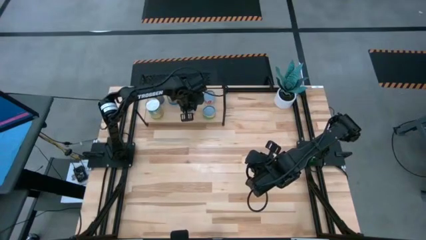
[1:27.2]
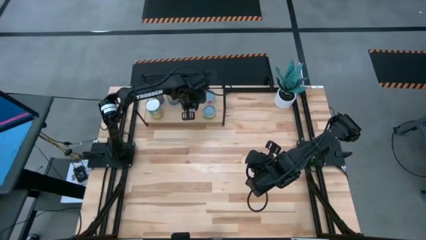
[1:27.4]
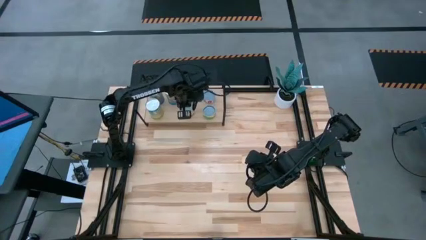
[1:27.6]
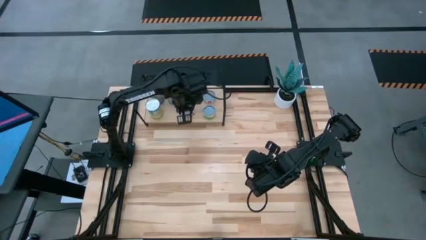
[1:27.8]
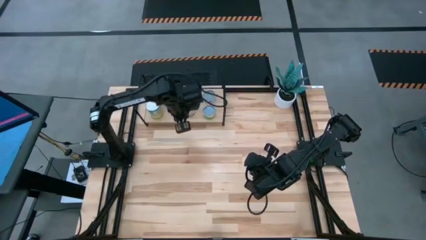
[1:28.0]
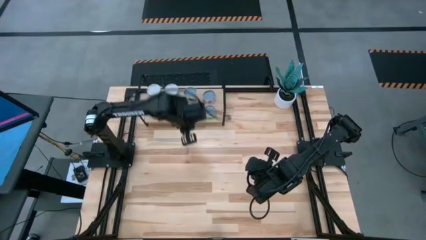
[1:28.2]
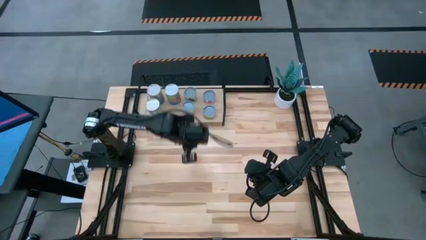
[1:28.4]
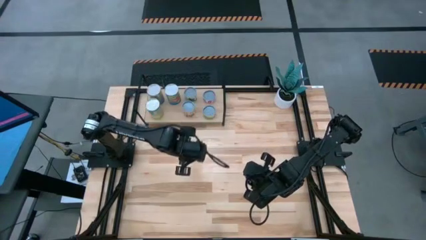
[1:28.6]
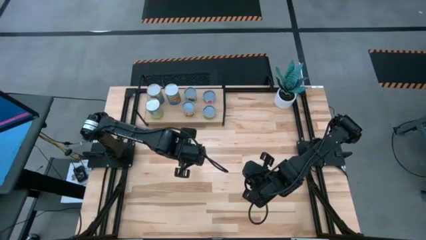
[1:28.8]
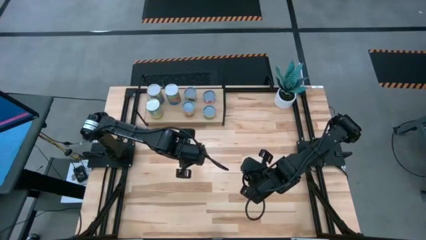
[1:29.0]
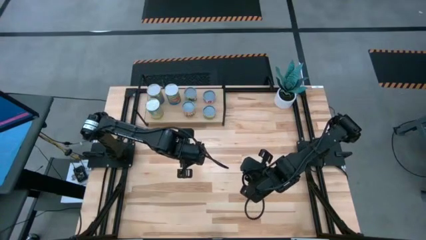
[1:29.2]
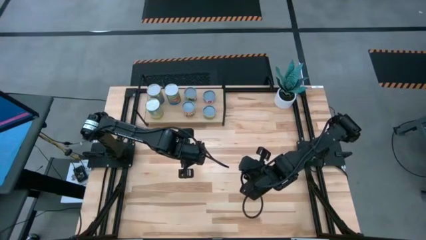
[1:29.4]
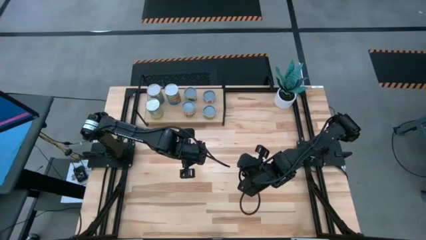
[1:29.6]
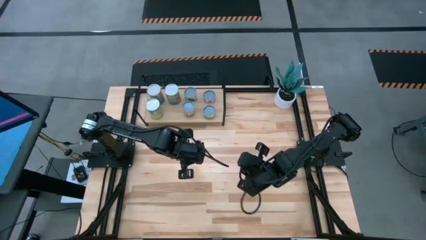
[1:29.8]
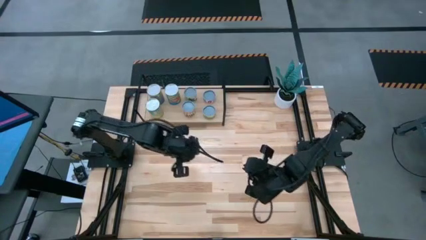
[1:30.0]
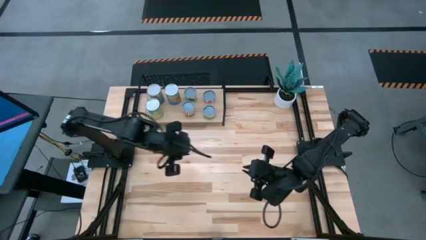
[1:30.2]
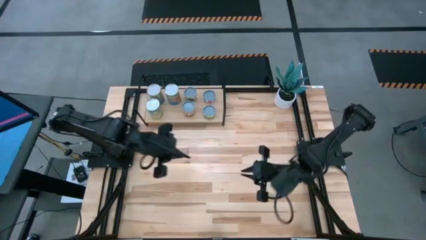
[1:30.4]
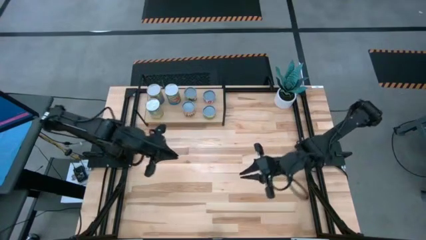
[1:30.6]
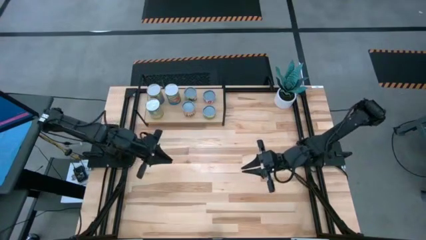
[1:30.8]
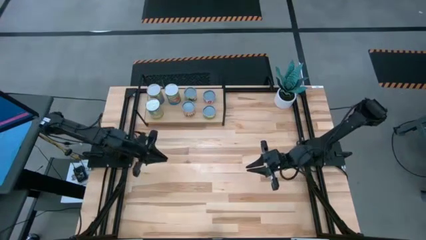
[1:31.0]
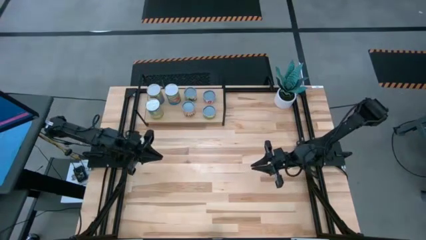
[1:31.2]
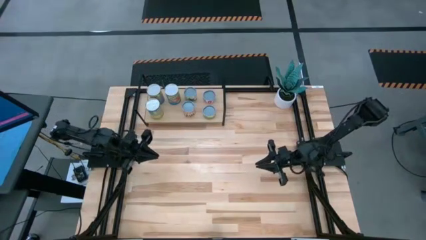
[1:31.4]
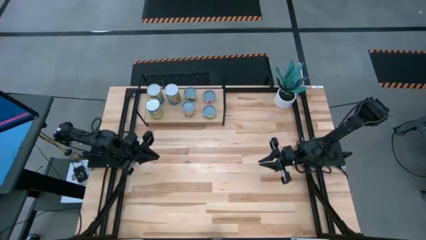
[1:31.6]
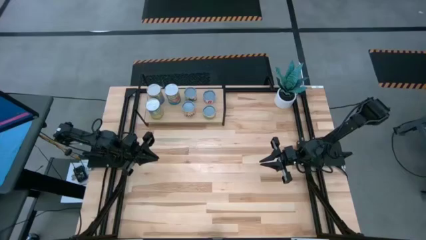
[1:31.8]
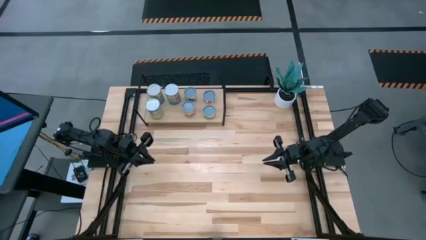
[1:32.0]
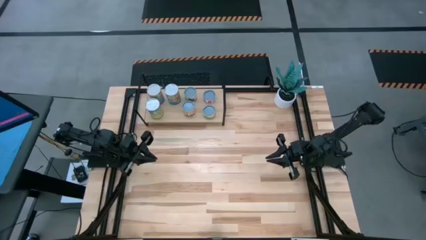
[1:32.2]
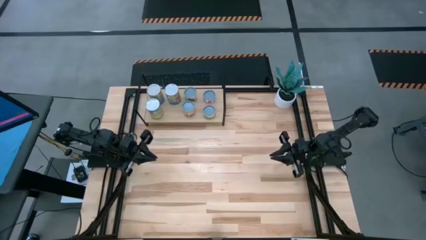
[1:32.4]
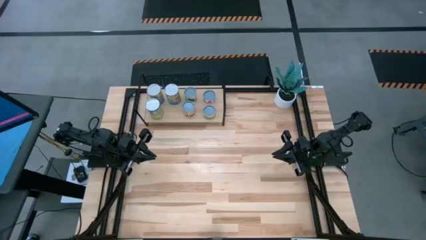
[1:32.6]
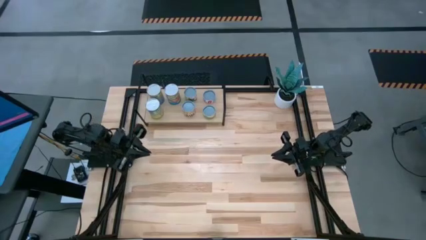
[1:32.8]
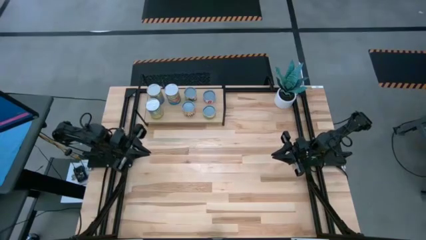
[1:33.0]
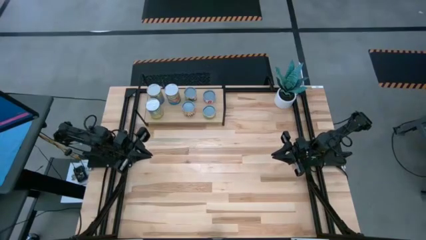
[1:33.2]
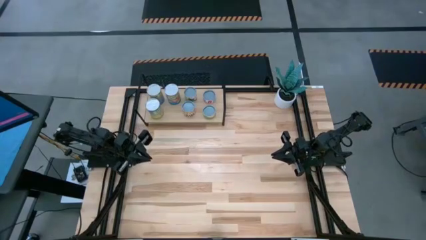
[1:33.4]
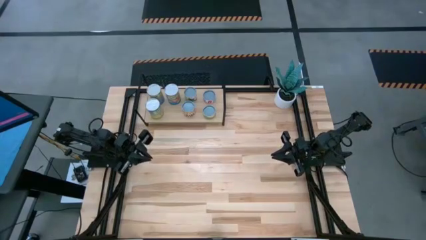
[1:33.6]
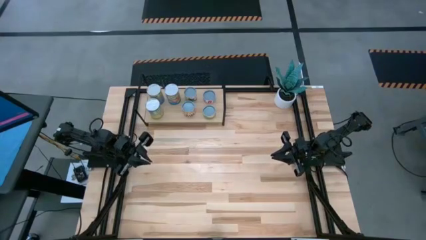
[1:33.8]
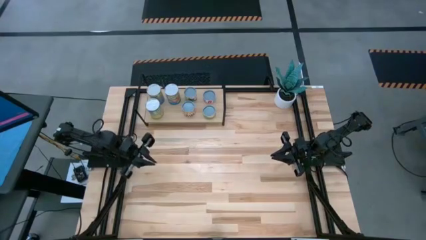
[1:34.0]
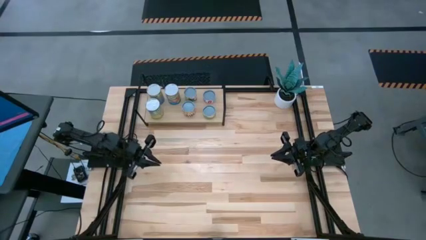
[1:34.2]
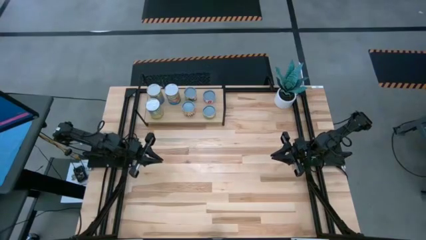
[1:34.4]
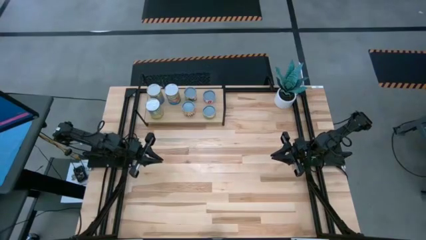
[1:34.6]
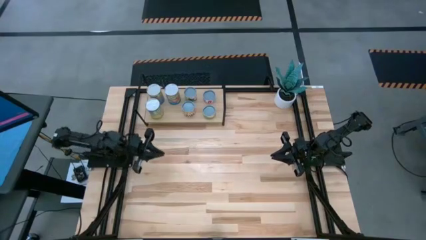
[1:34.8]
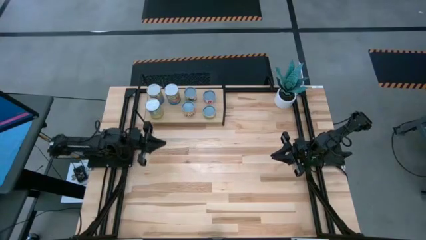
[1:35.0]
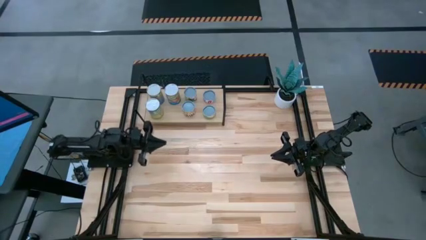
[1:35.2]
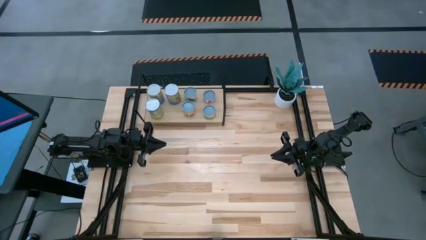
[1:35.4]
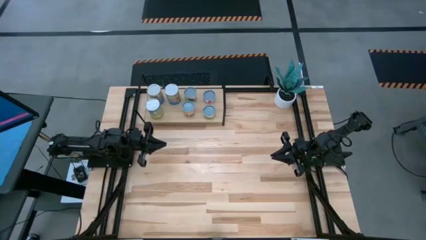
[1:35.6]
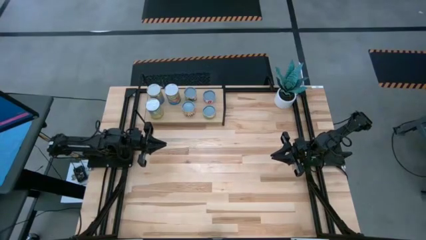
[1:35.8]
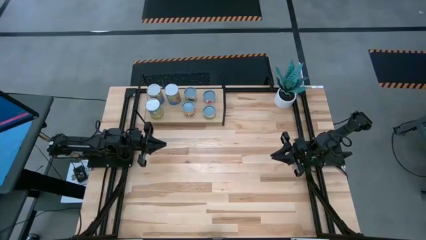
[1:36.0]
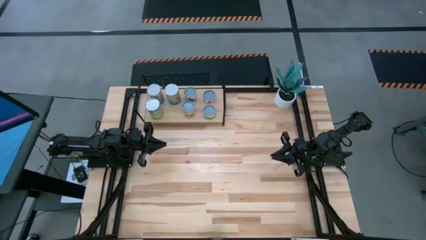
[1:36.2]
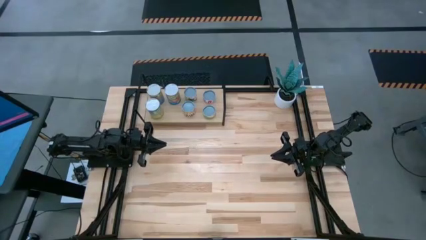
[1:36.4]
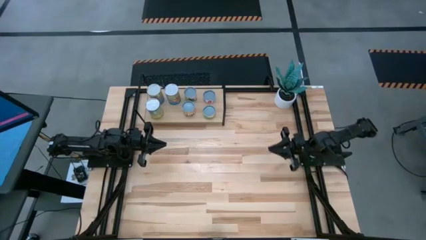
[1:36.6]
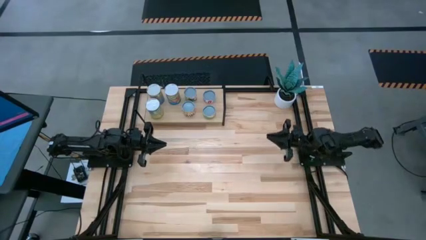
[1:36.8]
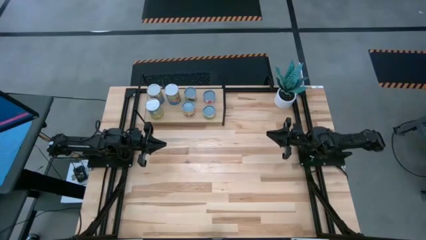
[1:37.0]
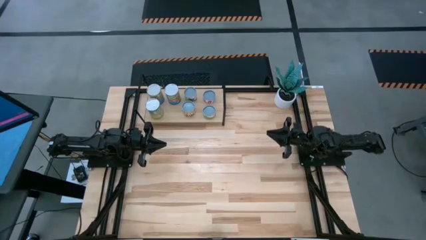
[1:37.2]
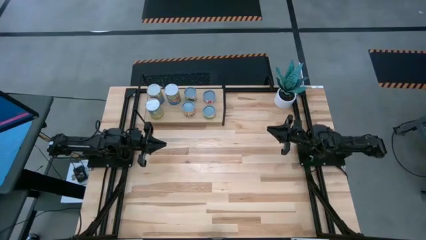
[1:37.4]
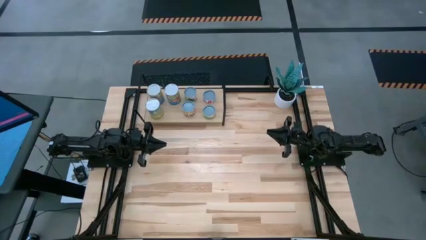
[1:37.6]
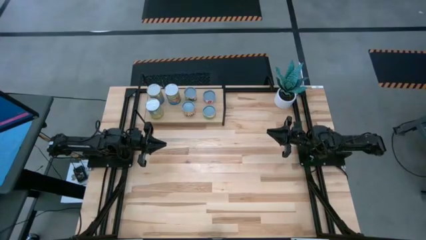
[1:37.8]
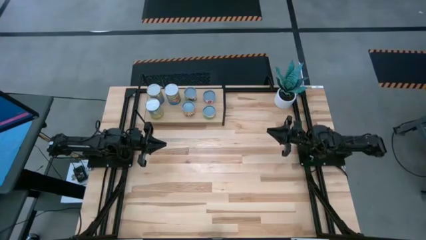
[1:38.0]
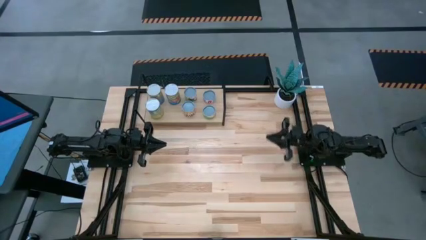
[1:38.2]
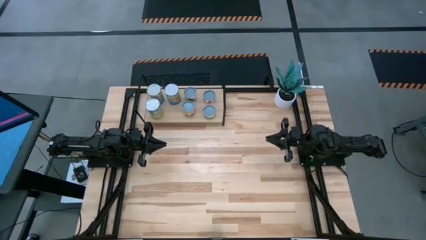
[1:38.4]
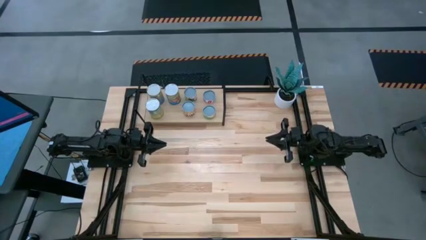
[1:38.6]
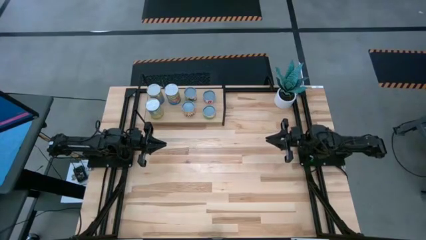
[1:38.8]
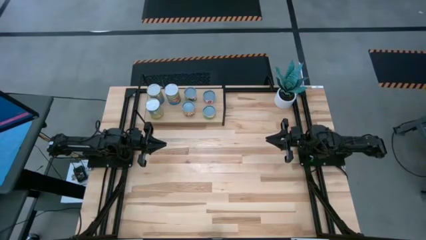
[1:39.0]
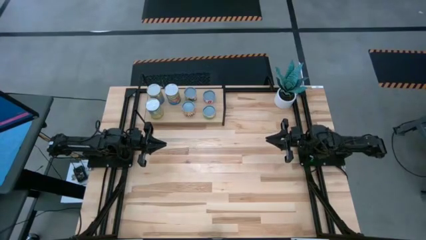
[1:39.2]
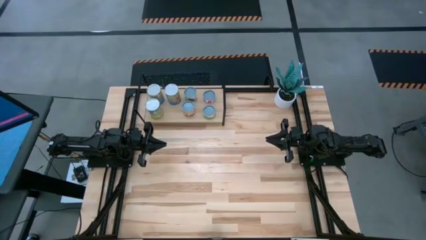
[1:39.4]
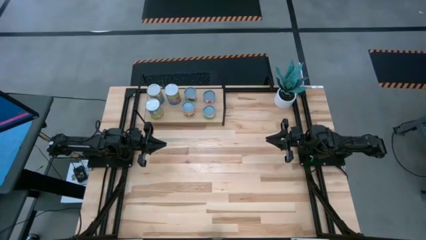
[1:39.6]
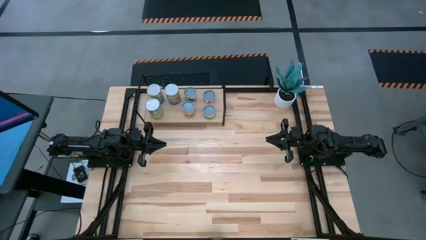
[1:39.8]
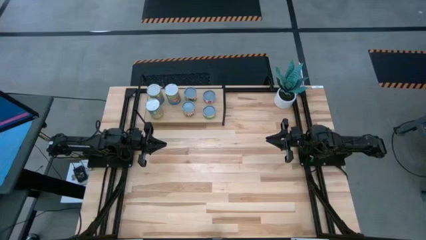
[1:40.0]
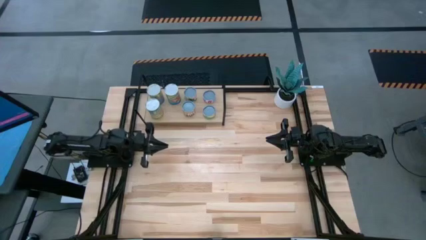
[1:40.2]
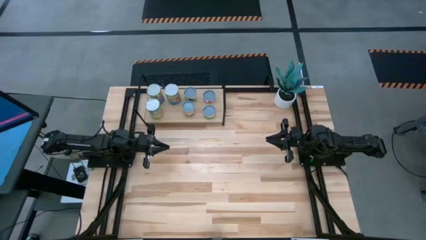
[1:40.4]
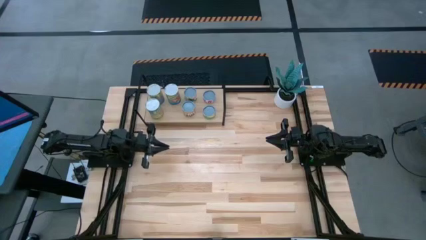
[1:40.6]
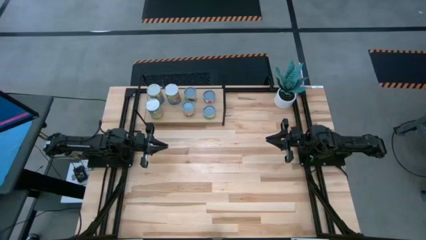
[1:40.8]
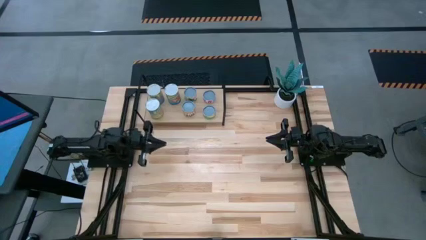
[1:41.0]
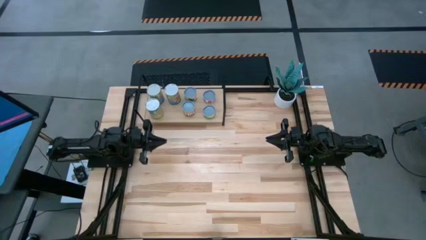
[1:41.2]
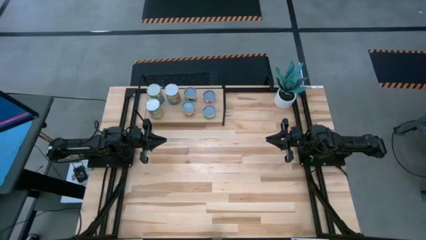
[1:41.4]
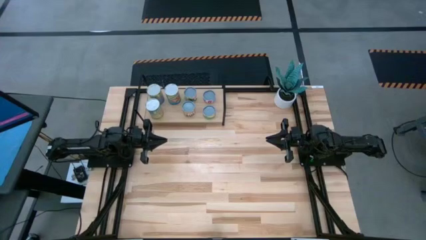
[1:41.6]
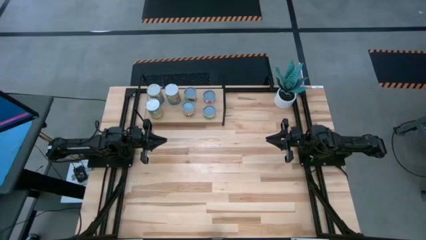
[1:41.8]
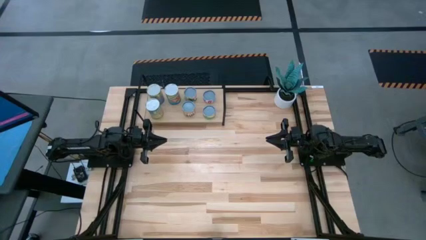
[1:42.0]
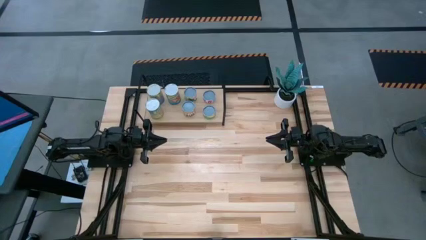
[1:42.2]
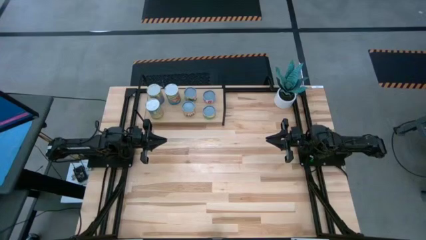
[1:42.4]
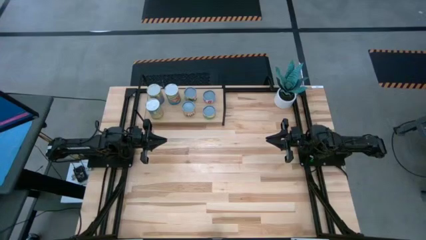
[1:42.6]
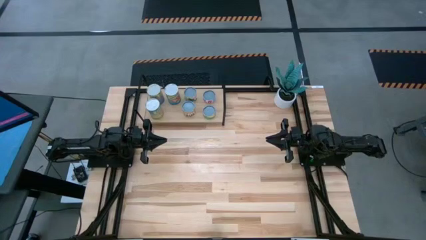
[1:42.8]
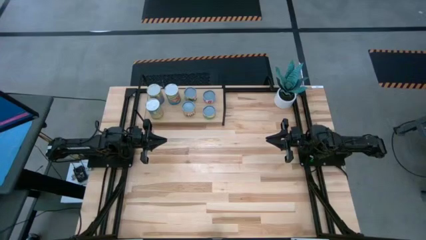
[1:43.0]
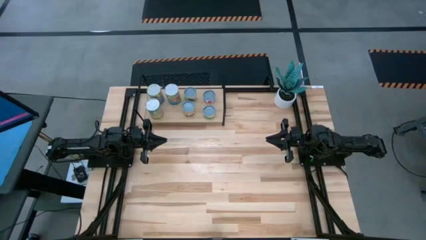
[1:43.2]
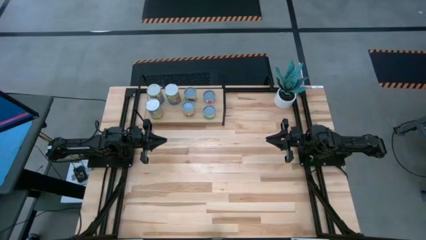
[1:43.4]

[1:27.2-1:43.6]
Task: Pick and place cans onto a shelf
Return to Home Position
